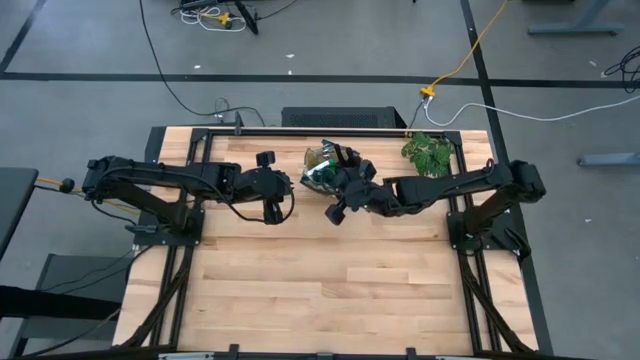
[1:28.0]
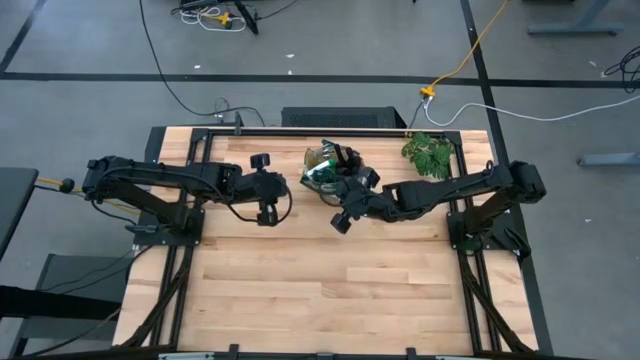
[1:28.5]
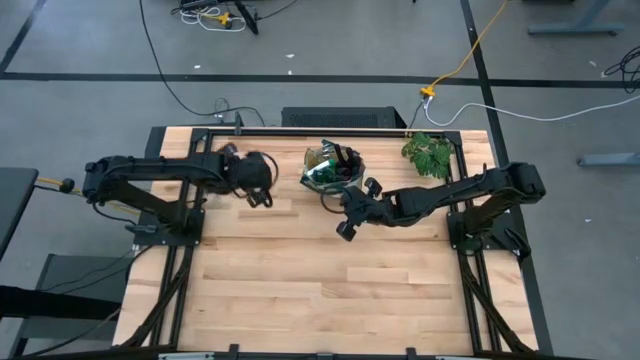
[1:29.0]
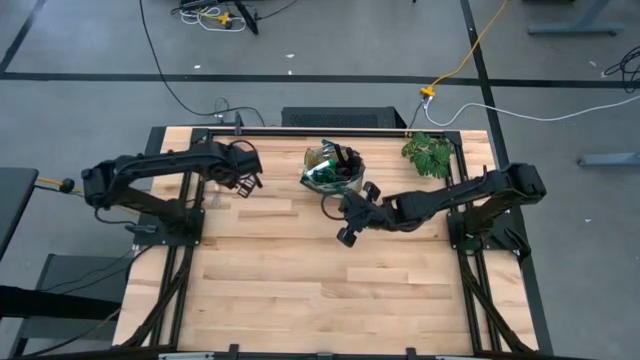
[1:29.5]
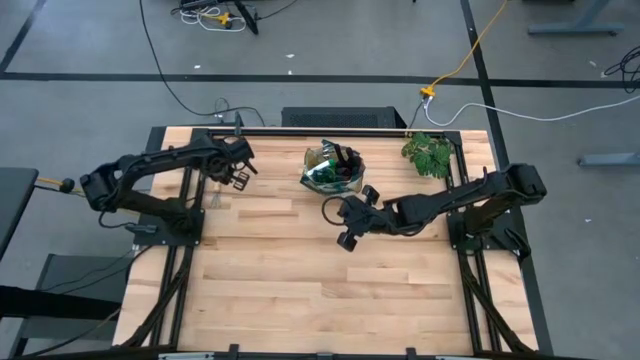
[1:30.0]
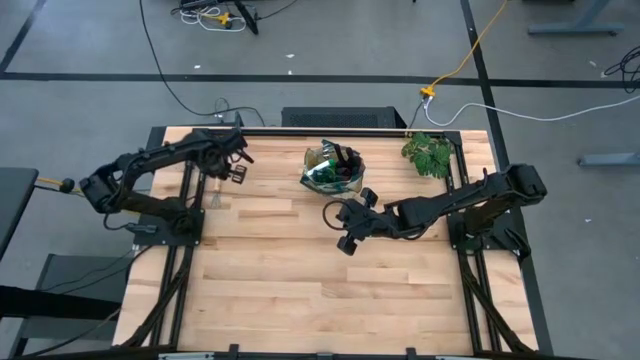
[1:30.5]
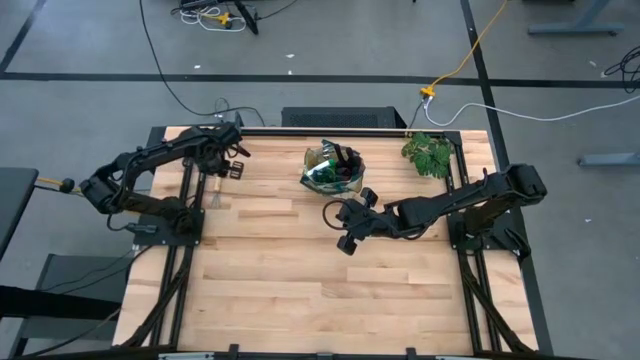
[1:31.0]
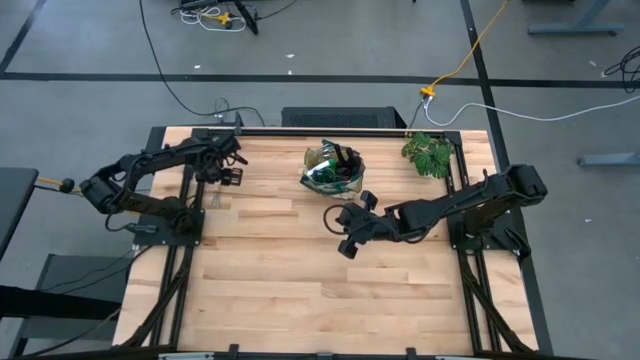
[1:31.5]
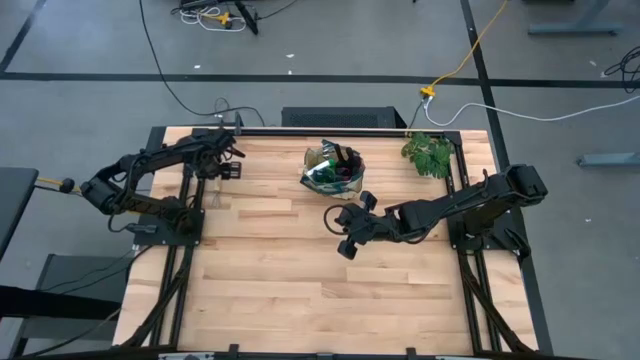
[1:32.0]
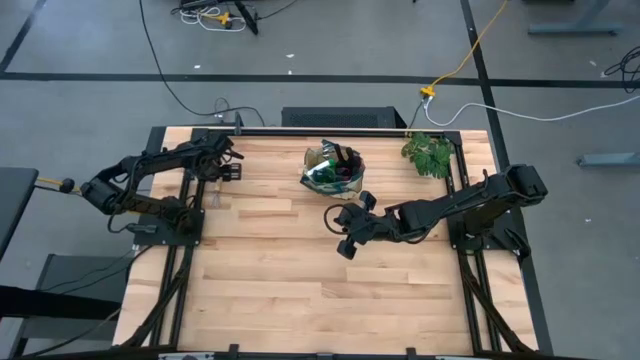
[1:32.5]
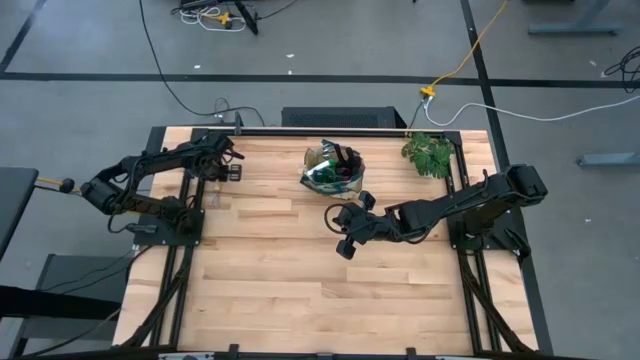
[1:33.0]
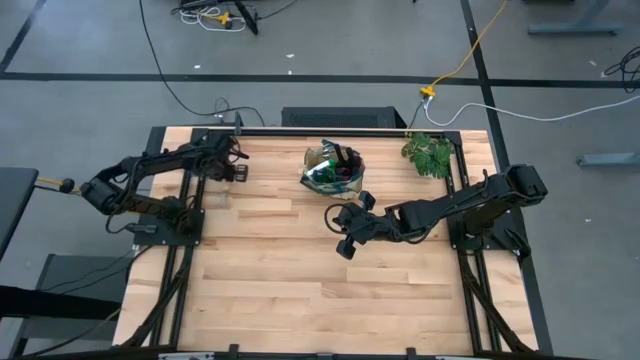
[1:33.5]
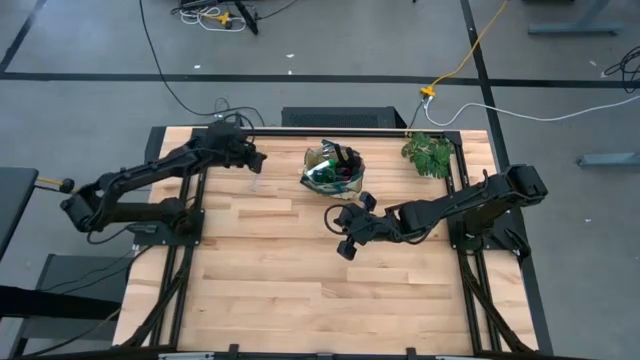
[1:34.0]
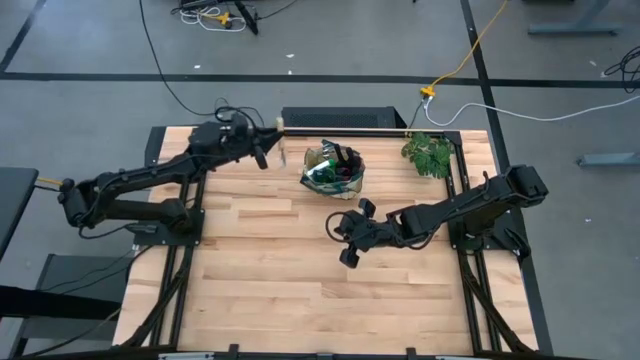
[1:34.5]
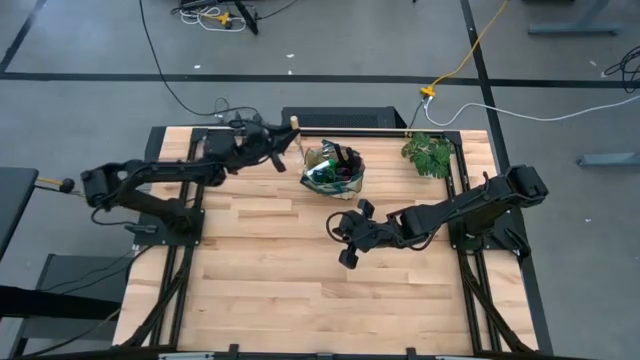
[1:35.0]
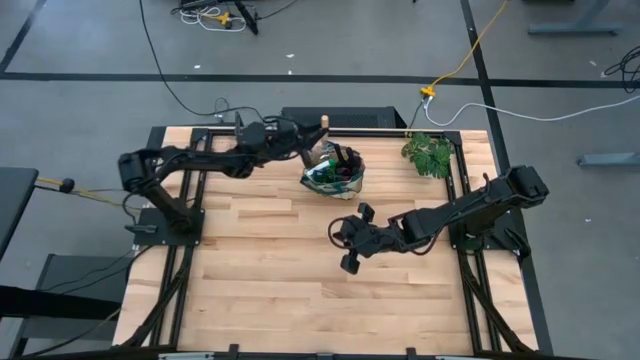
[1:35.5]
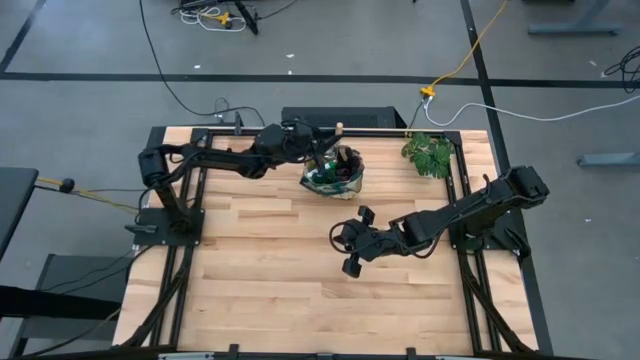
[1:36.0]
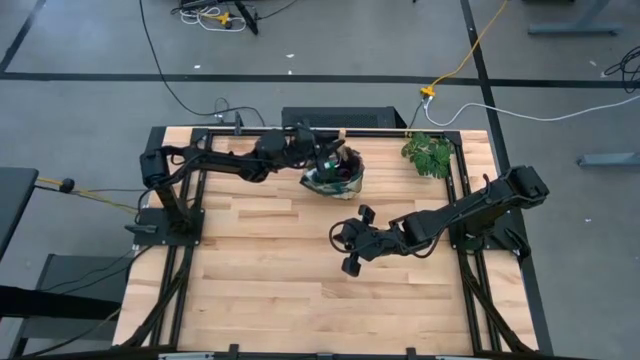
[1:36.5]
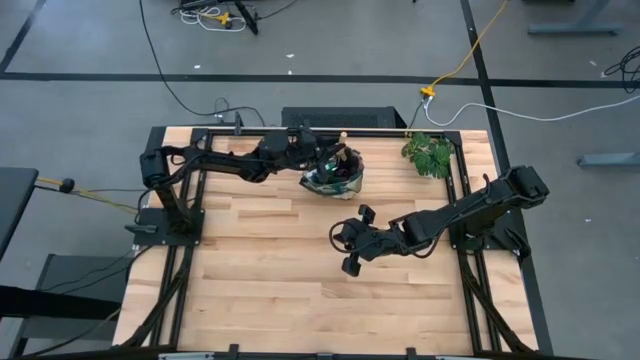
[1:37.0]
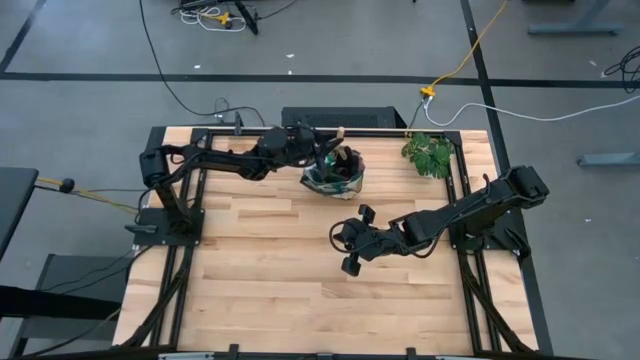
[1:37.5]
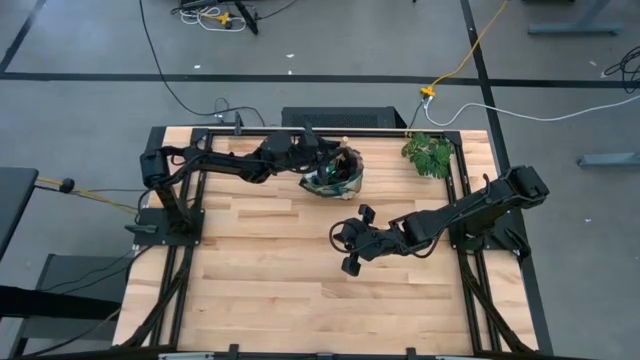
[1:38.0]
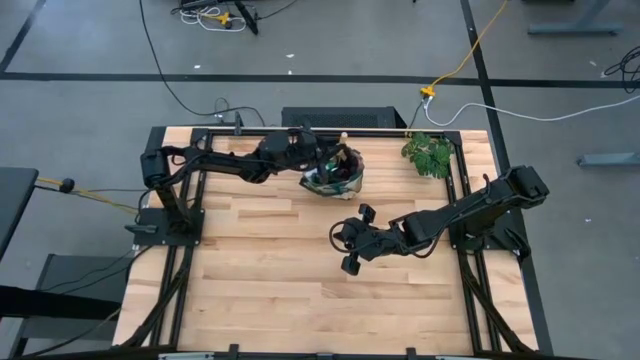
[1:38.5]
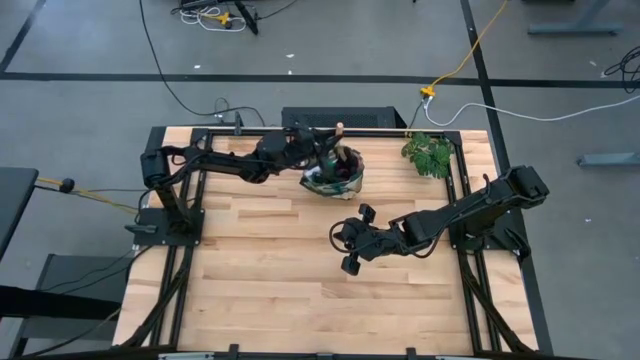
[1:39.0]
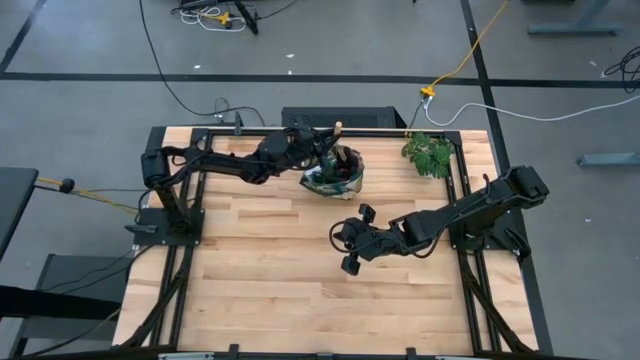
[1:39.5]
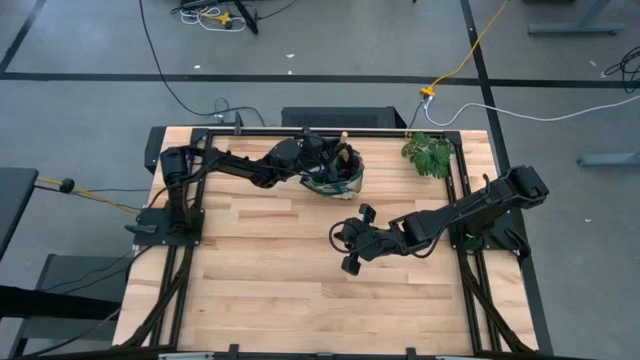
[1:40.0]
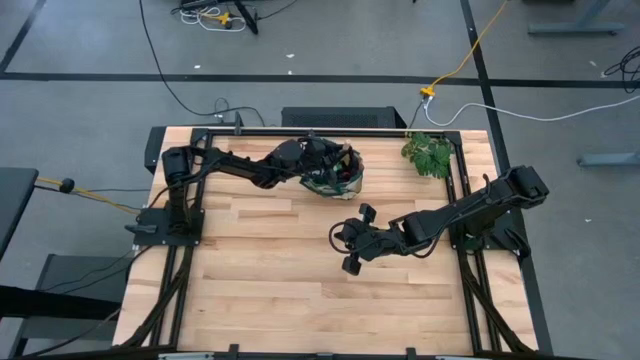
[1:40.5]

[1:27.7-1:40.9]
Task: Pick & Place Garden tools in Gardening bag
Put the hand cultivator into the tool bag

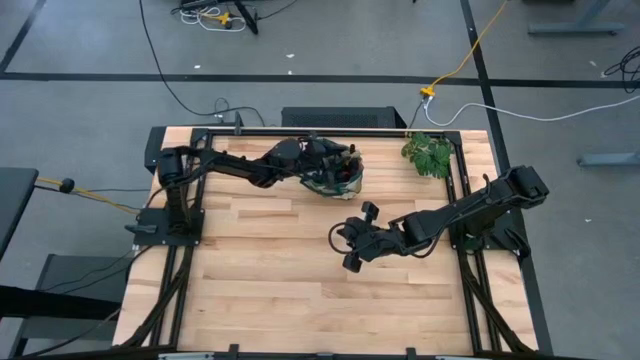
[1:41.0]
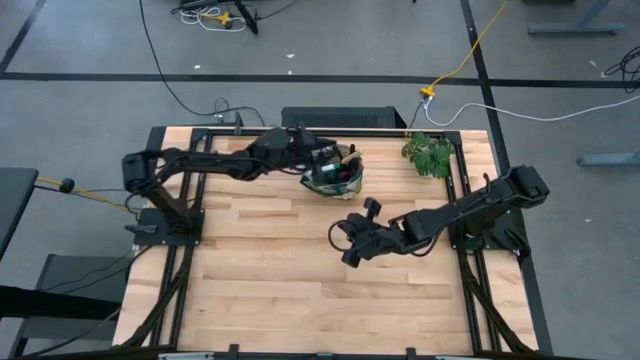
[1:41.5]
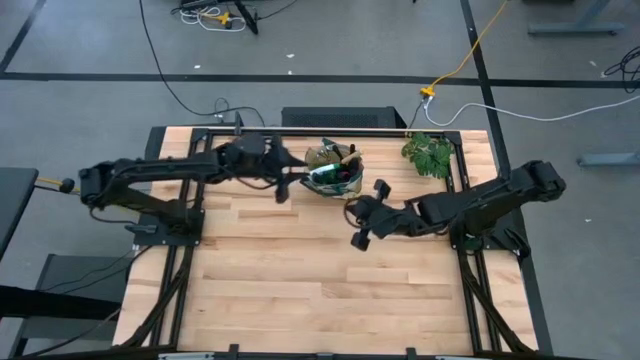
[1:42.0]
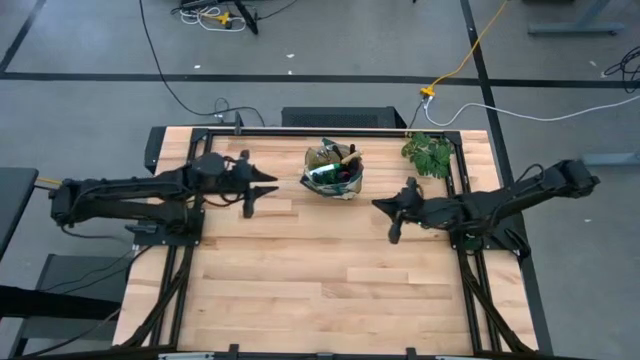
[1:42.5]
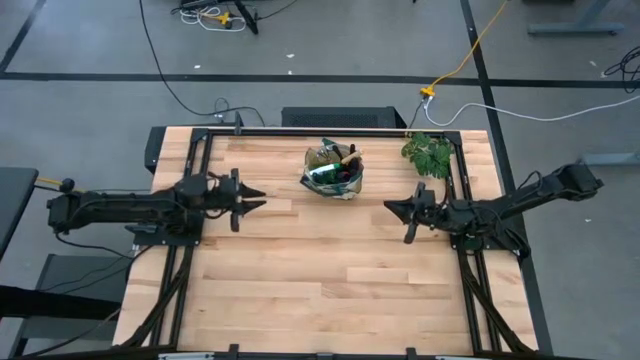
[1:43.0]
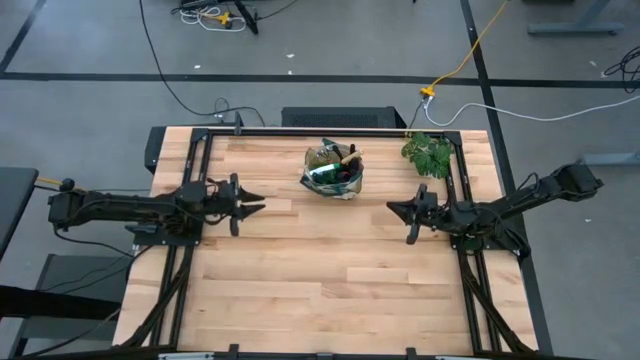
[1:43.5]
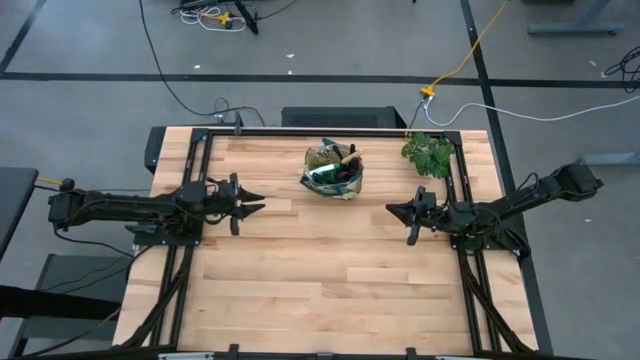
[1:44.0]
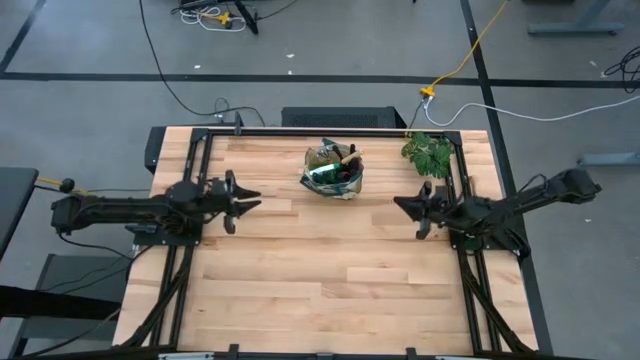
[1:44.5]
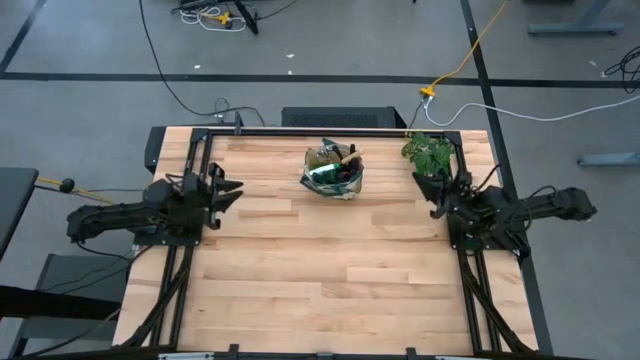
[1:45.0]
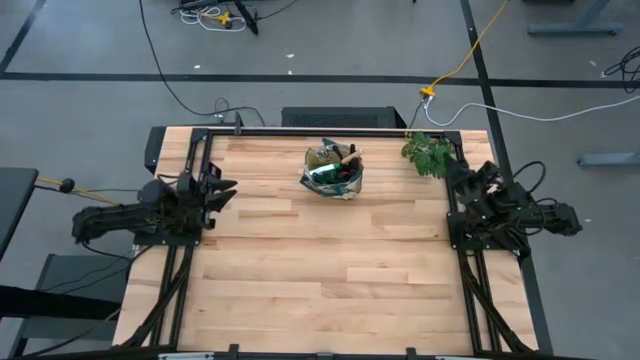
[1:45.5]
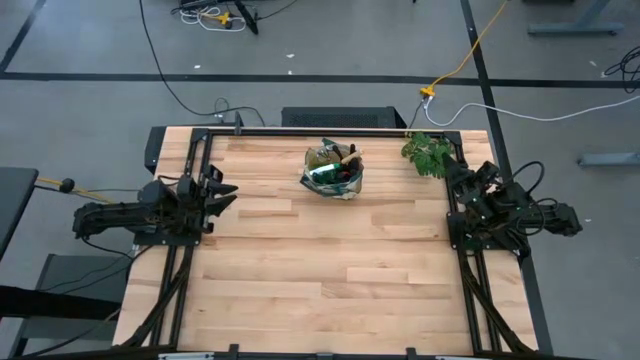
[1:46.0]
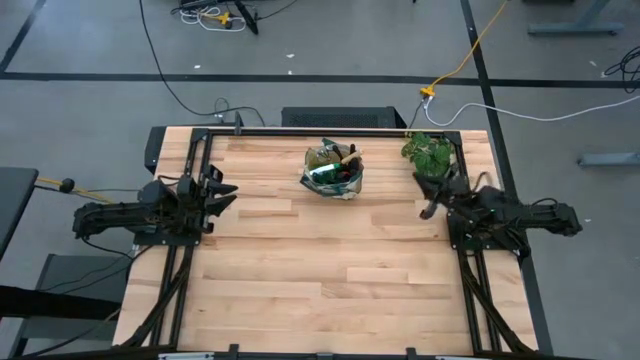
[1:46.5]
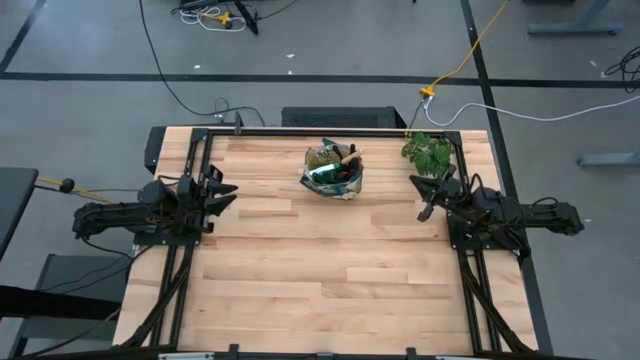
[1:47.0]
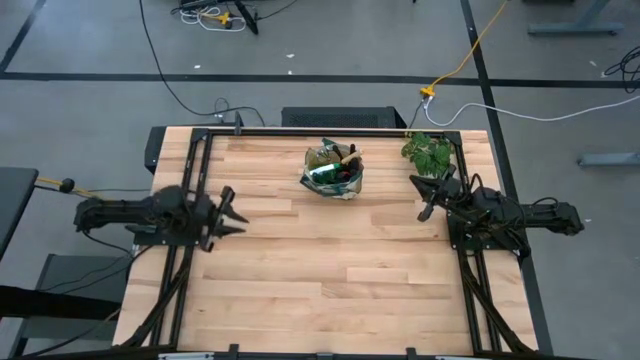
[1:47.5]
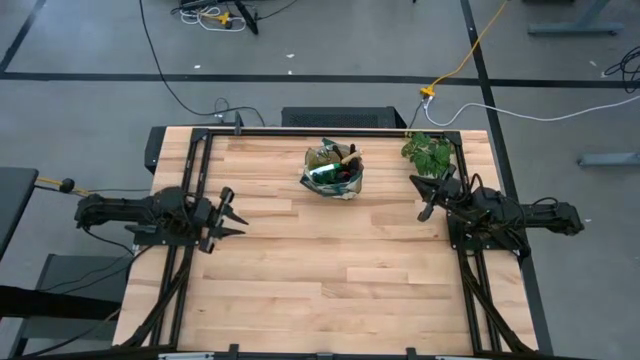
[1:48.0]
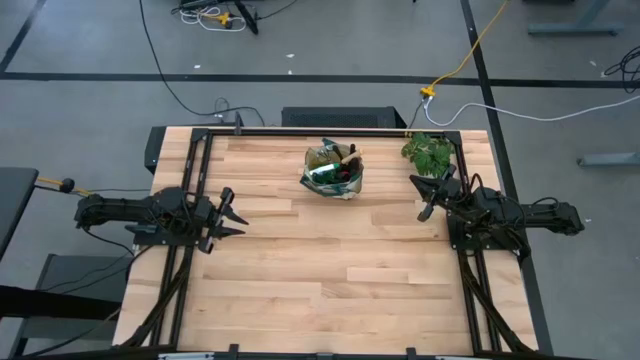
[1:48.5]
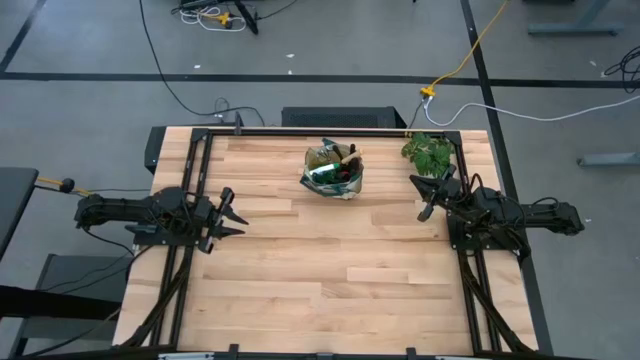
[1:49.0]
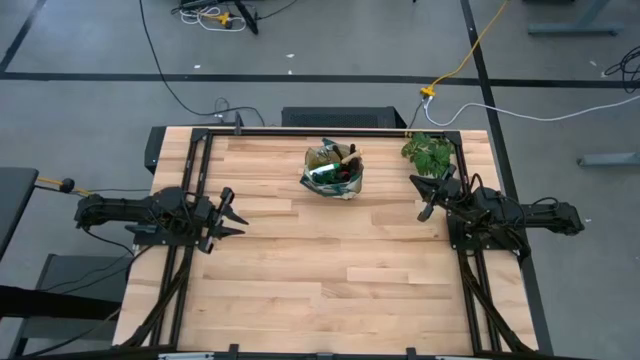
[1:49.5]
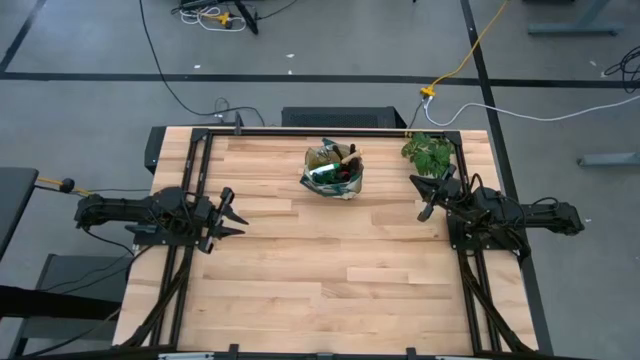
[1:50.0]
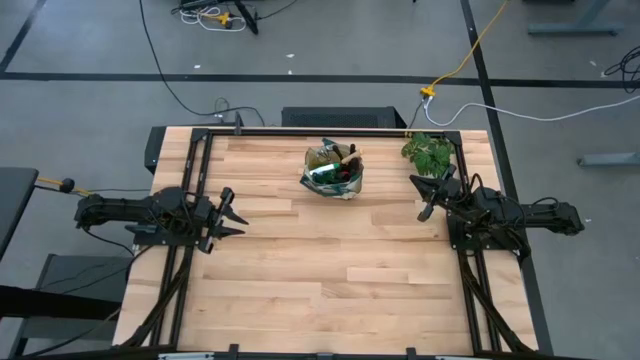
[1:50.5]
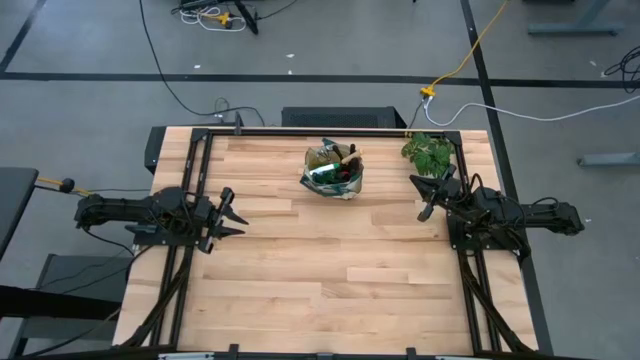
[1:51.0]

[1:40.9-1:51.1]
Return to home position
